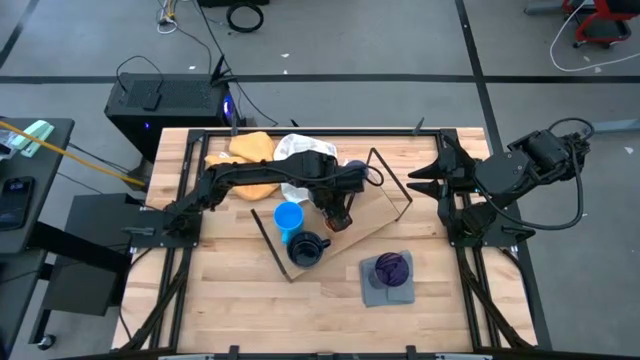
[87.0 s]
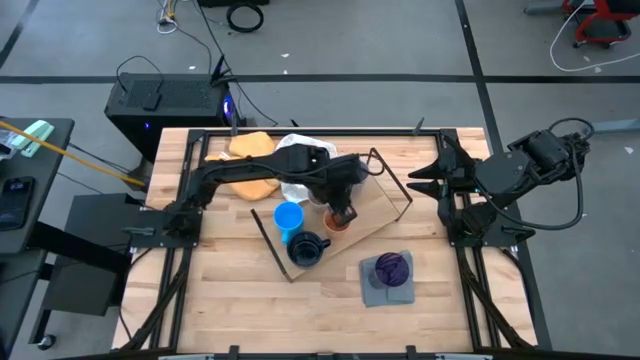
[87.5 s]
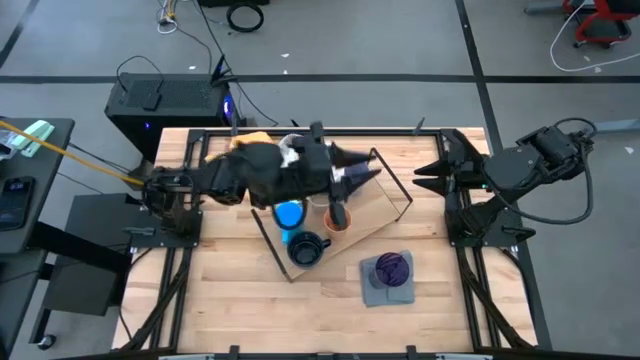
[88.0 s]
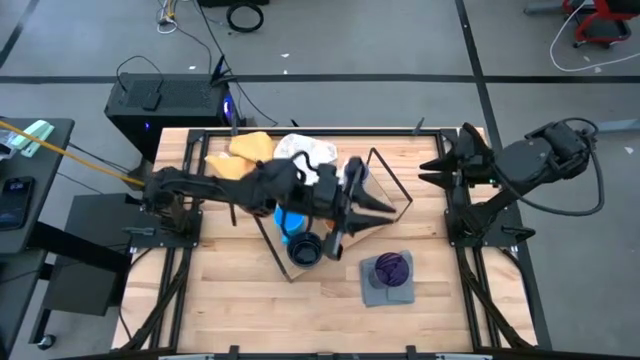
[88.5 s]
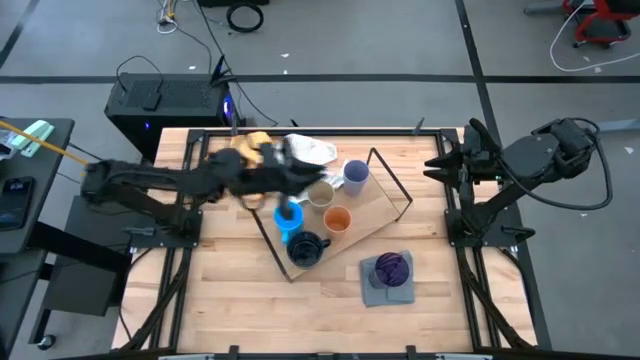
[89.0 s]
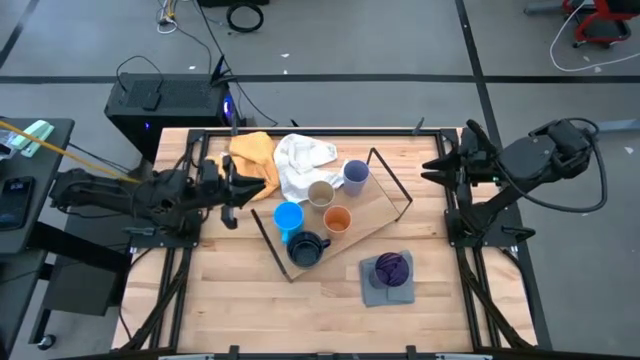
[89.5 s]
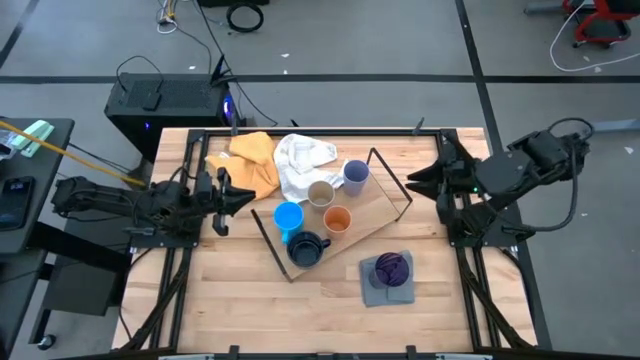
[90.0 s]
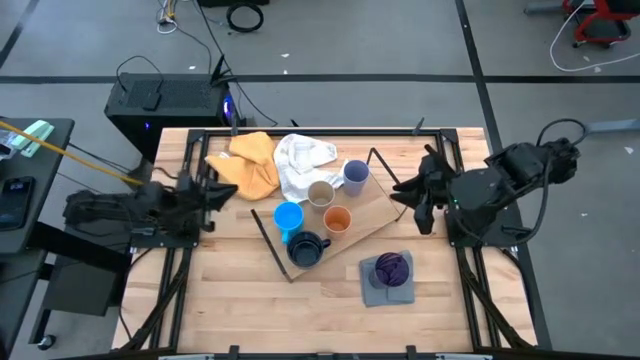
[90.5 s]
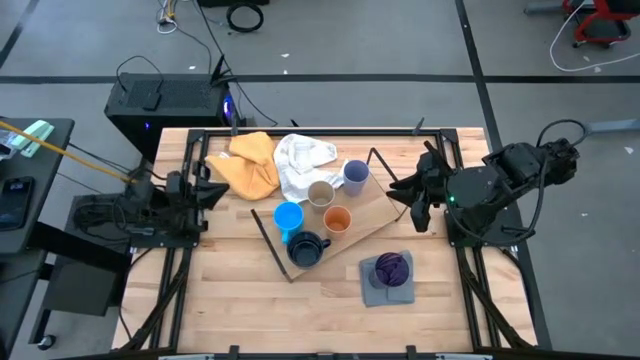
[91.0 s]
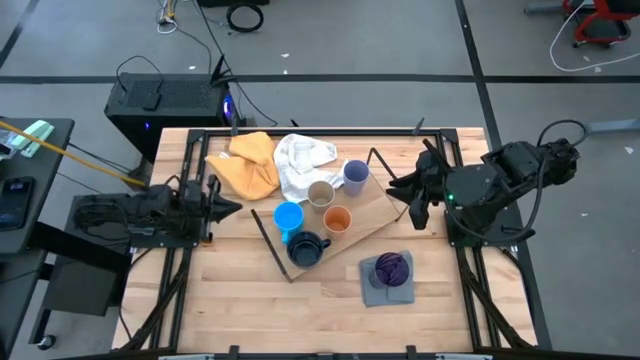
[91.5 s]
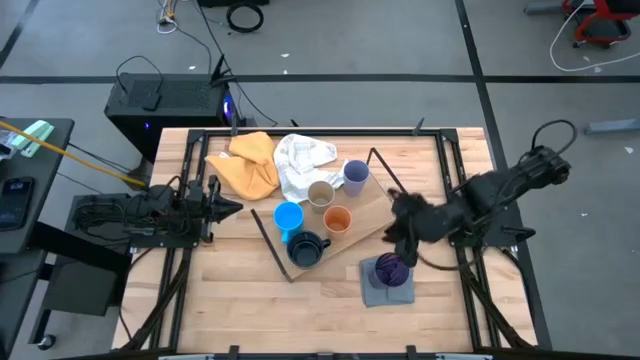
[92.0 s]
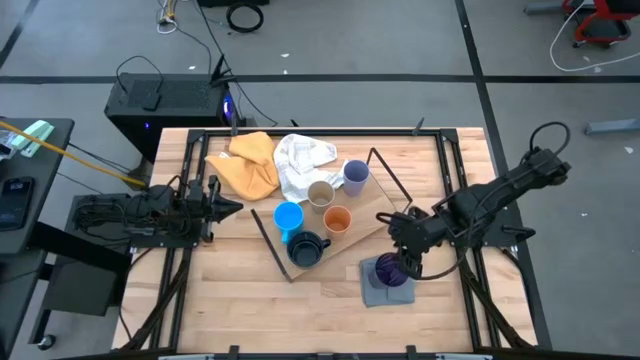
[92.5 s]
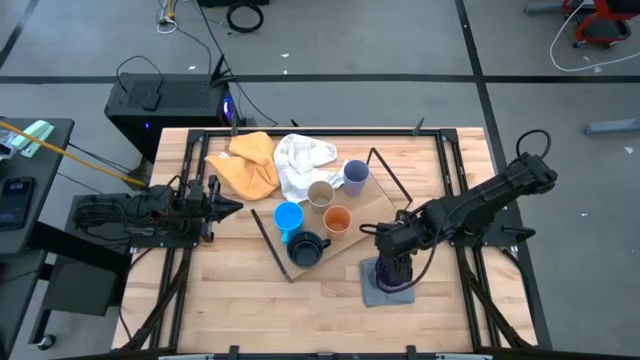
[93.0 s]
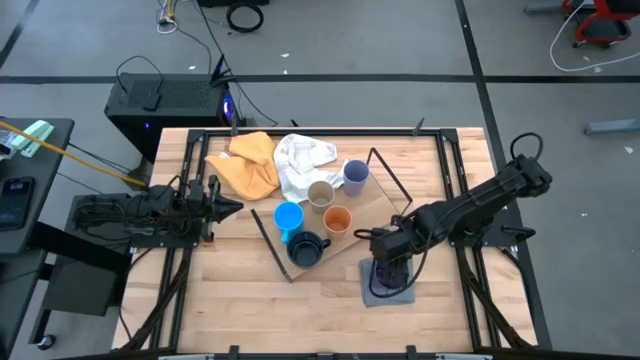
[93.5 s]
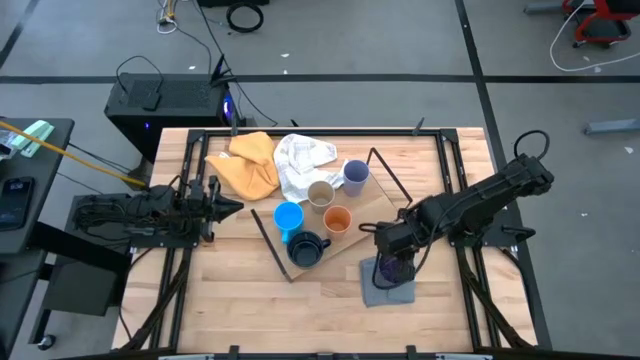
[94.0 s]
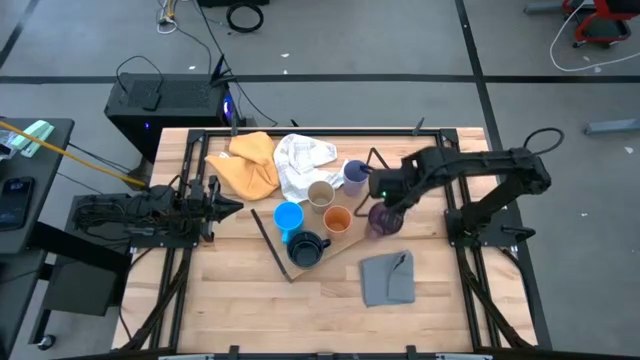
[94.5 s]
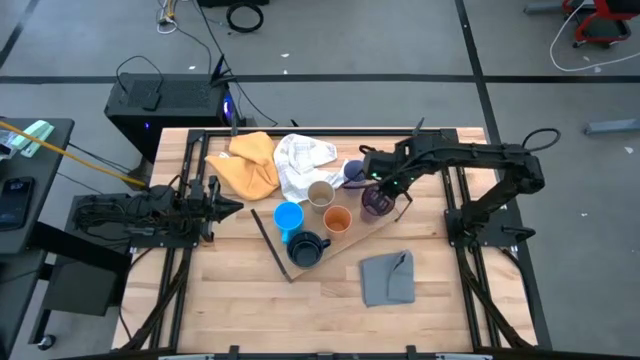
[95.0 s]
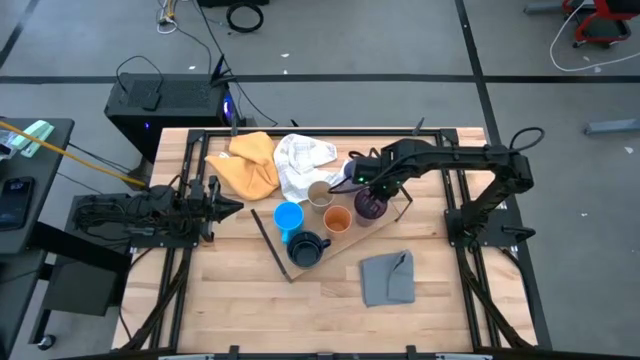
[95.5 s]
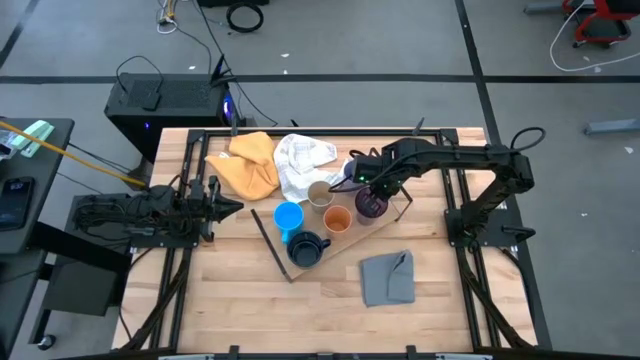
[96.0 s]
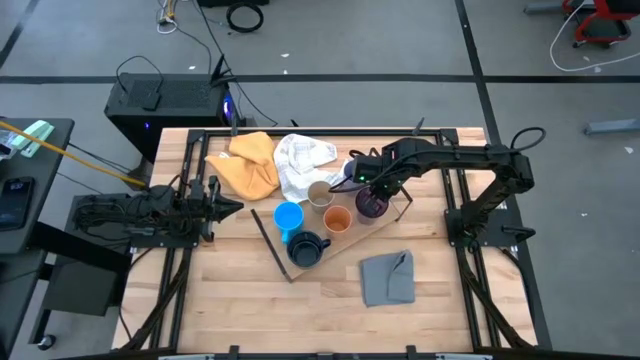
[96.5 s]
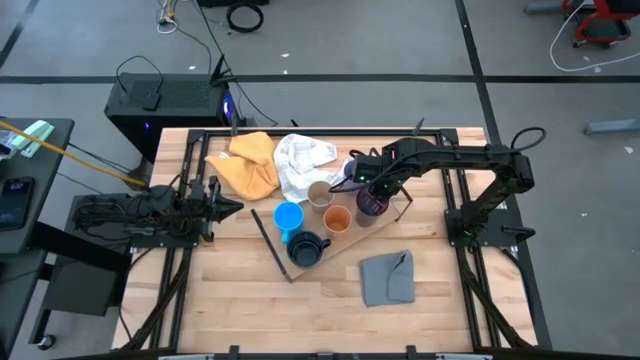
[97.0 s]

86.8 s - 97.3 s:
Task: Stack small to large cups/mugs on shelf
Align the violet cup with the white cup on the shelf

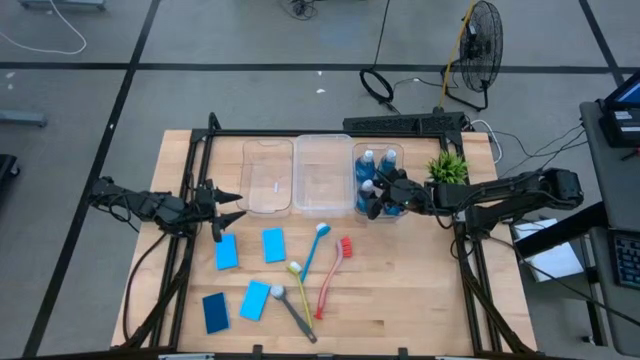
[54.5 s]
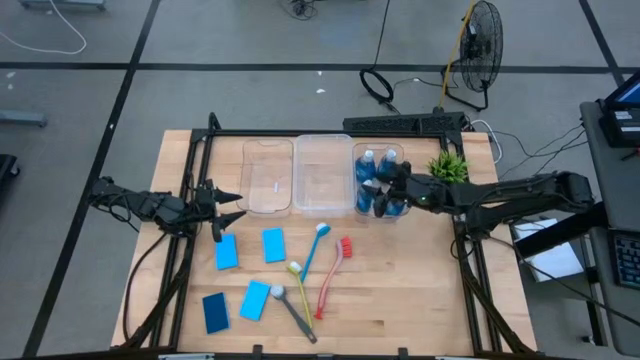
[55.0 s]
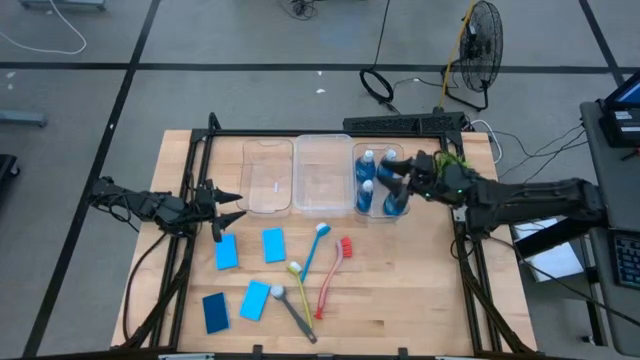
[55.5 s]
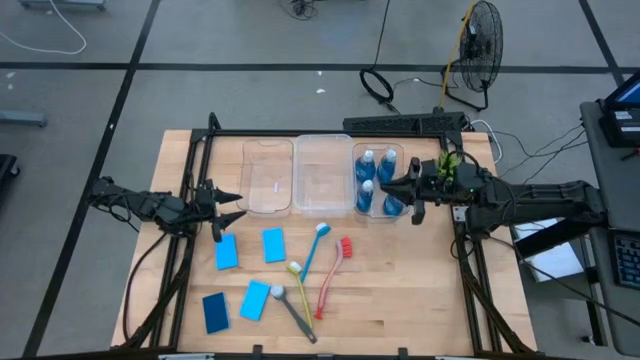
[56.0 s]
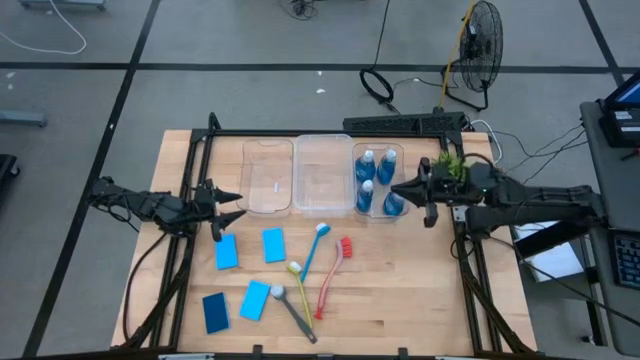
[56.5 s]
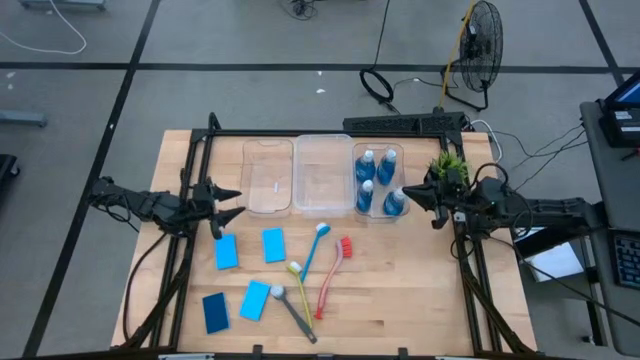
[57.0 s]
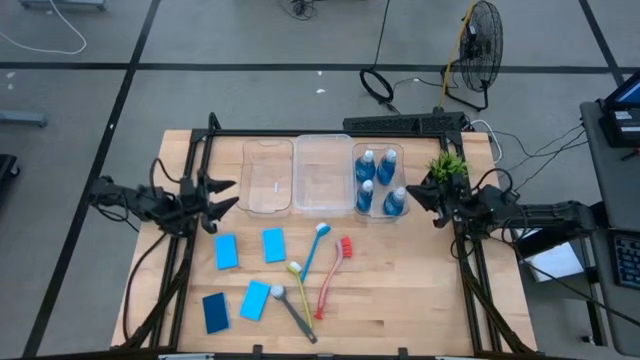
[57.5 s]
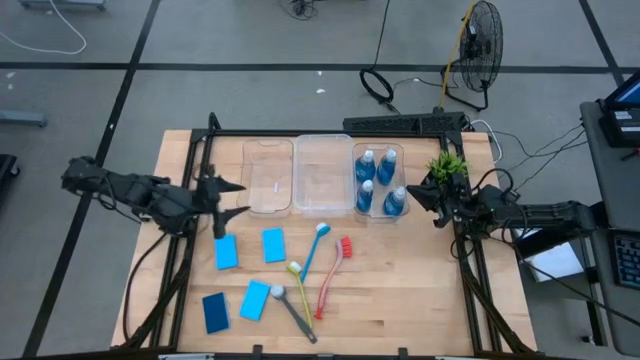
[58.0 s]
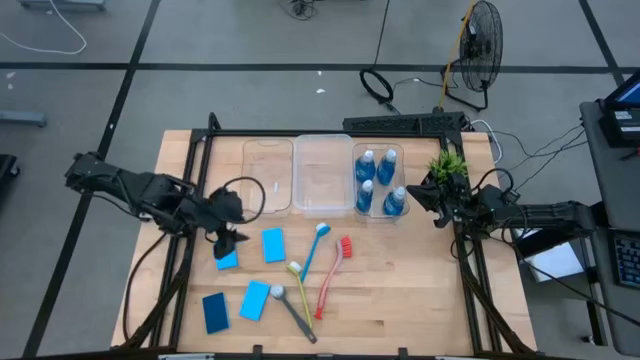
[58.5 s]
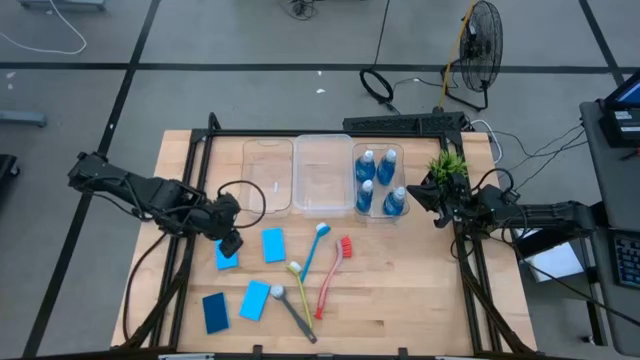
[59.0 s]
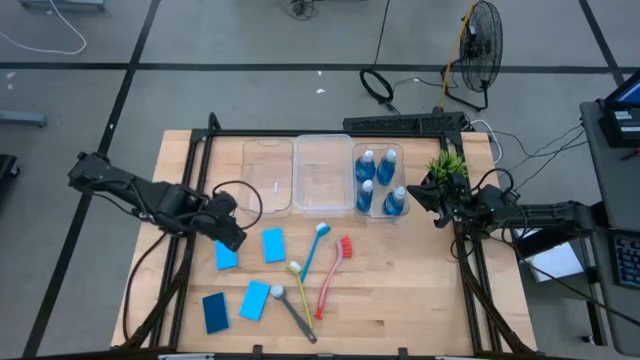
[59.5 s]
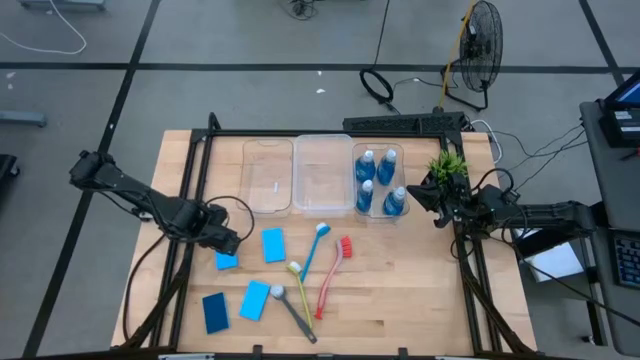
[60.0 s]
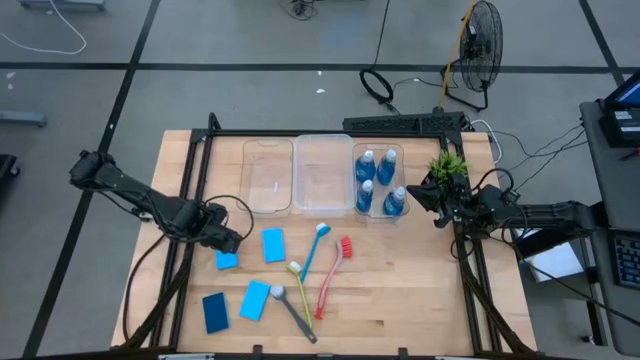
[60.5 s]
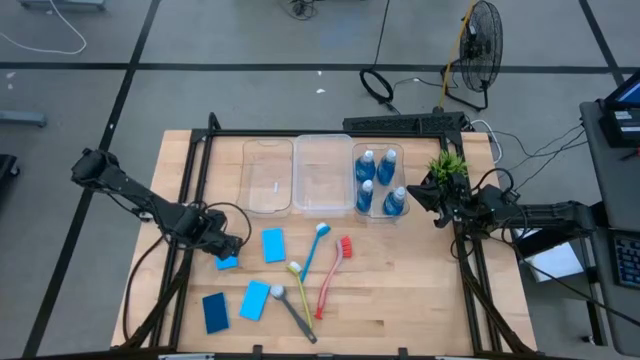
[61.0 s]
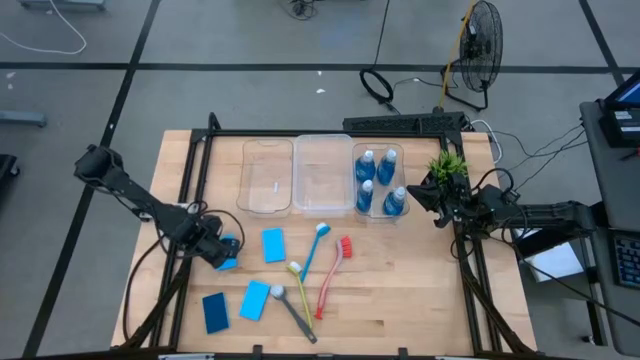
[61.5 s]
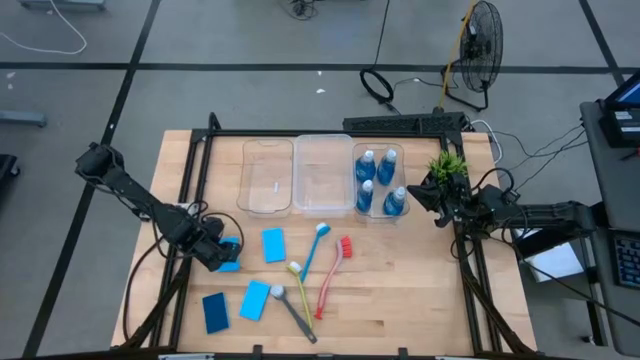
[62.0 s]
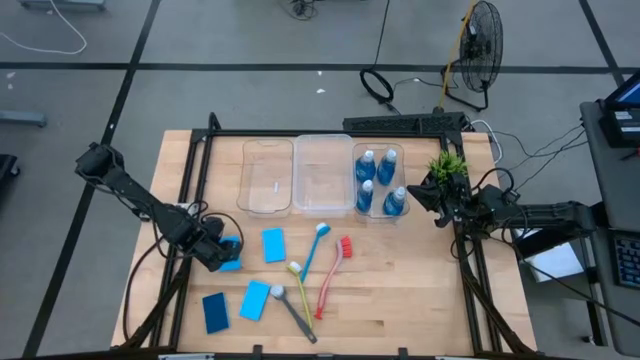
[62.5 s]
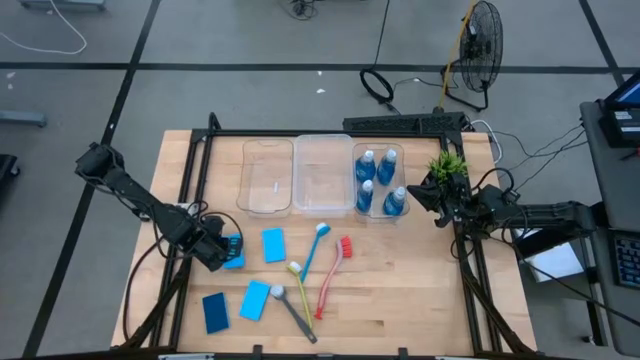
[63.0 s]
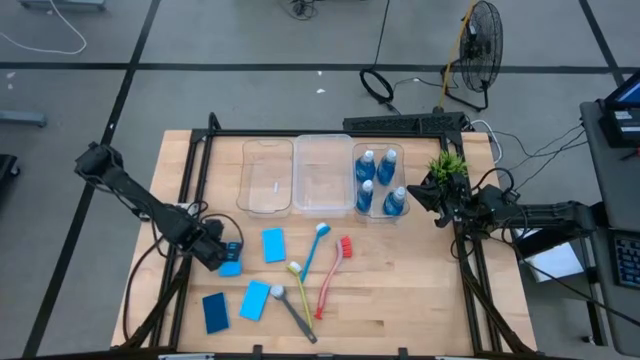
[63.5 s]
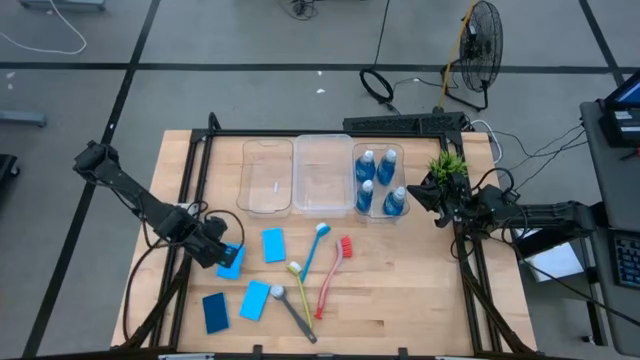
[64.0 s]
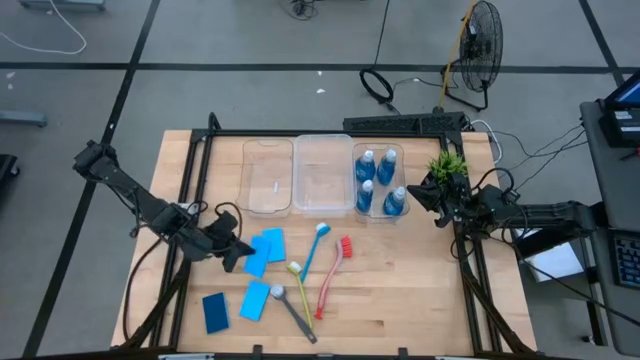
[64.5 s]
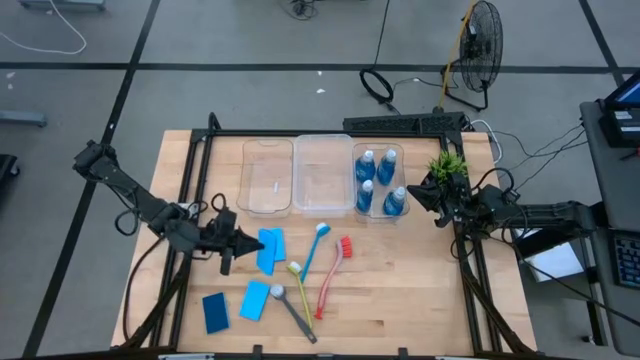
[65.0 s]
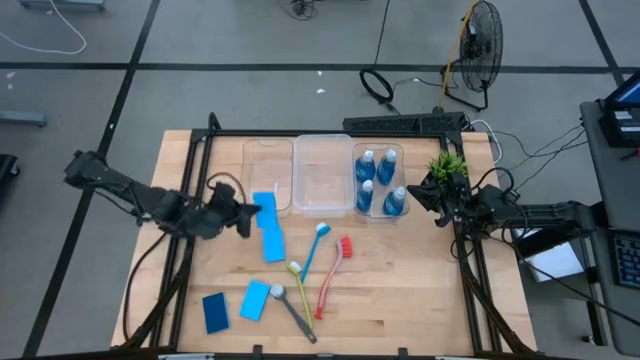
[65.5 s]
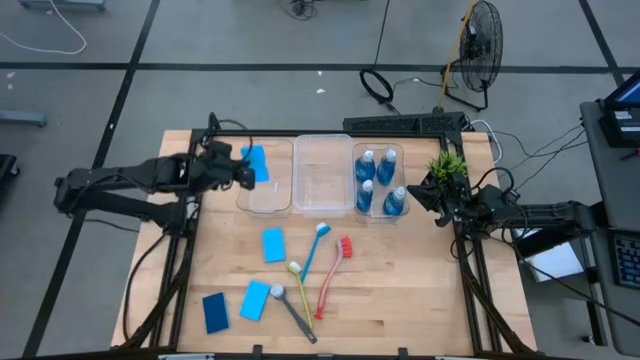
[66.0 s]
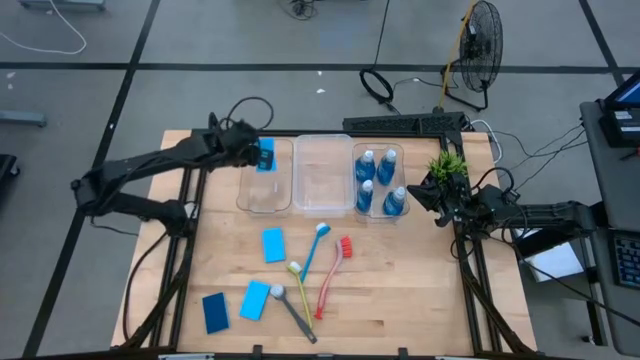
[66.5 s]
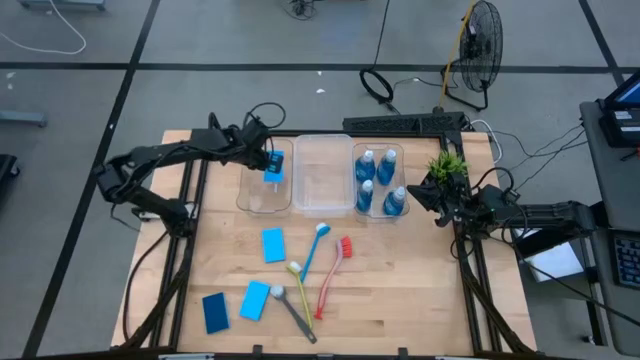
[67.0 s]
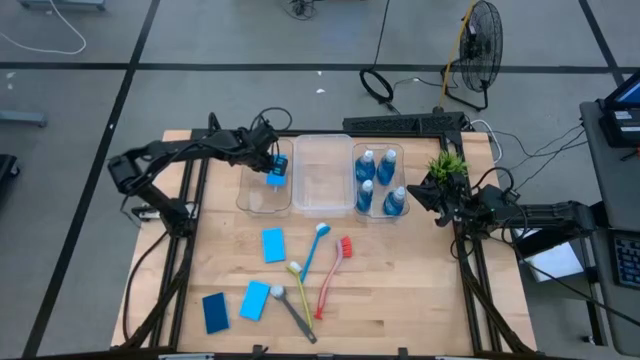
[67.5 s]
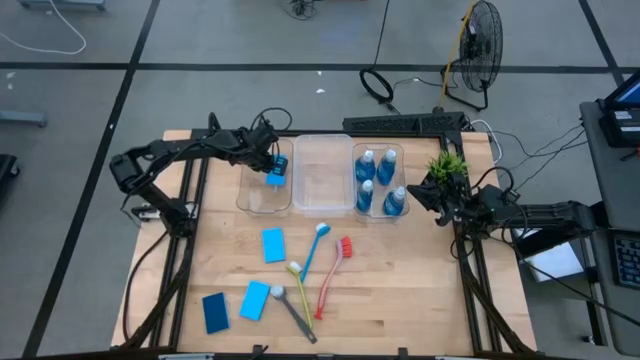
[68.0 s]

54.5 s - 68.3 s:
Task: Pick & Place Kitchen Sink Supplies
Put the blue sponge wipe into the left transparent bin
